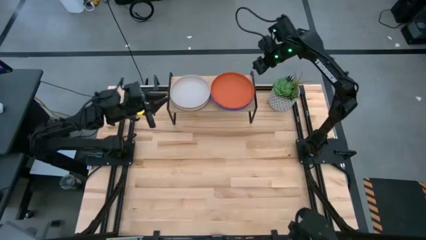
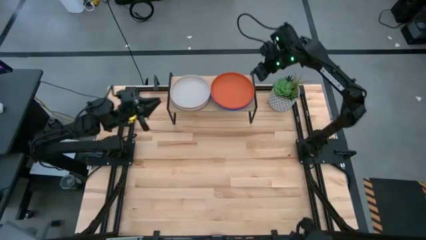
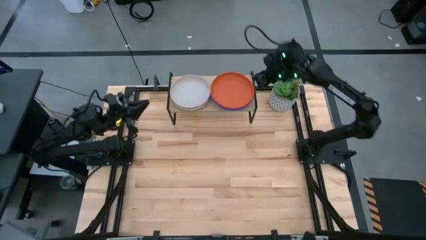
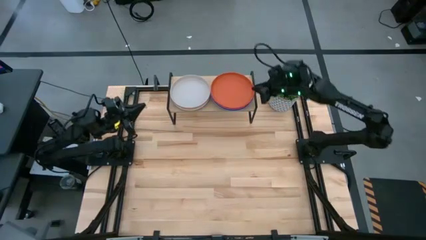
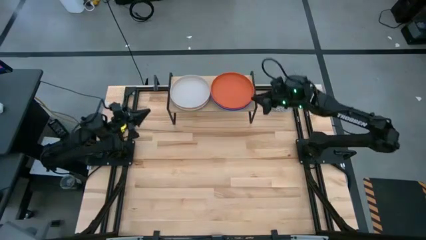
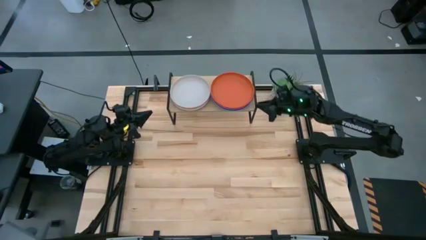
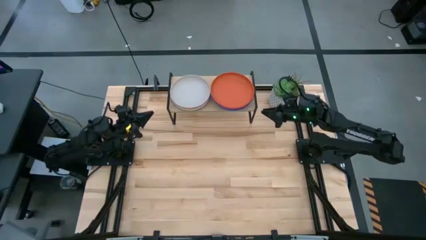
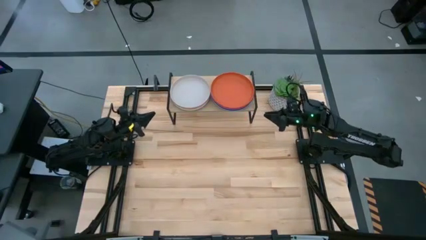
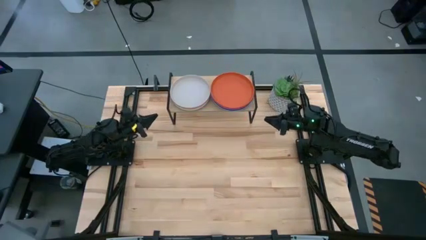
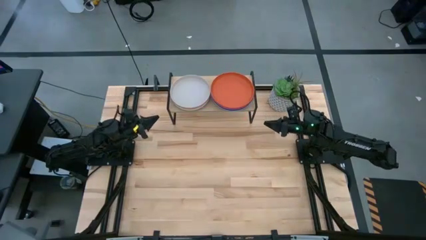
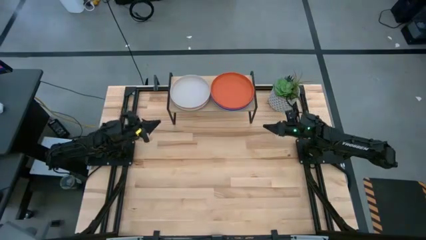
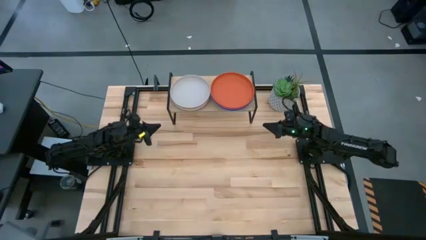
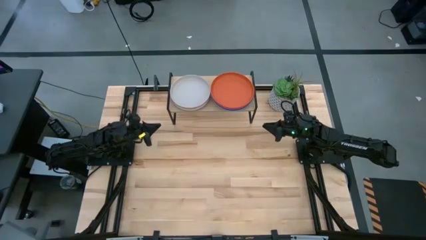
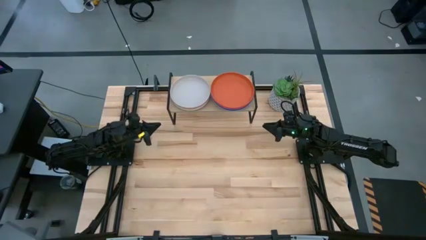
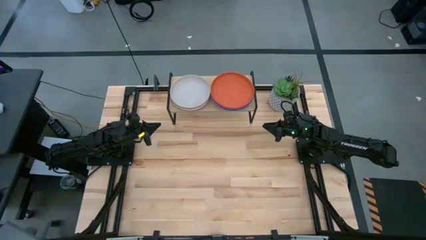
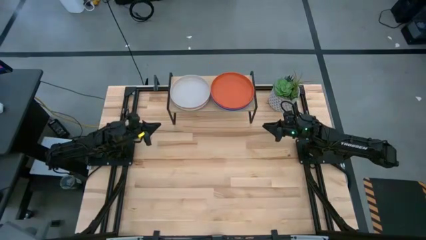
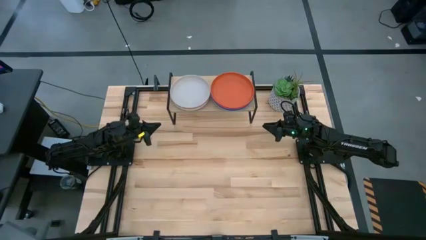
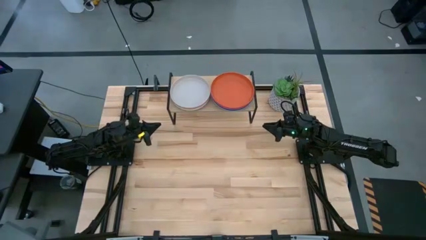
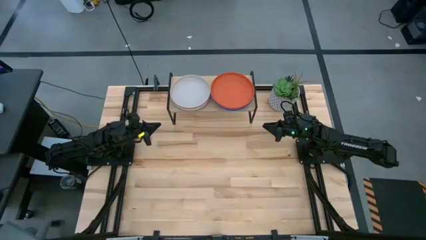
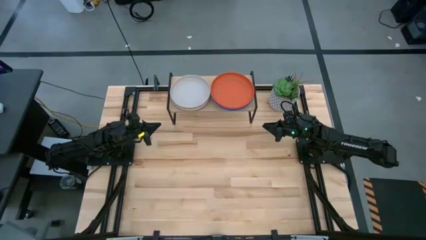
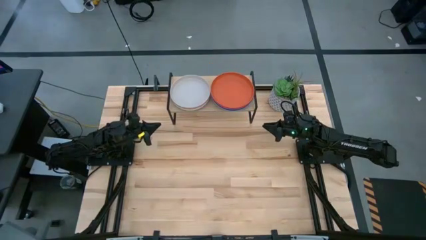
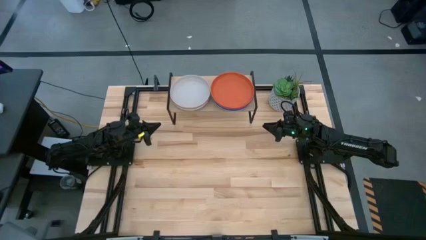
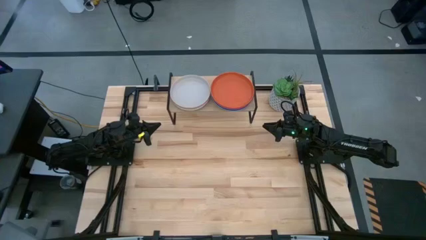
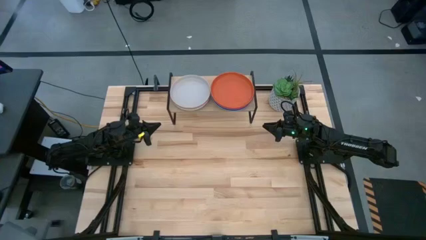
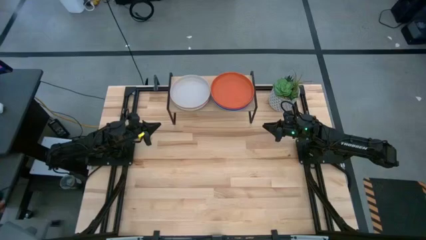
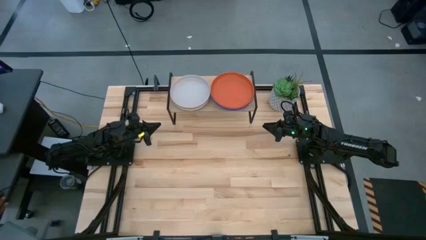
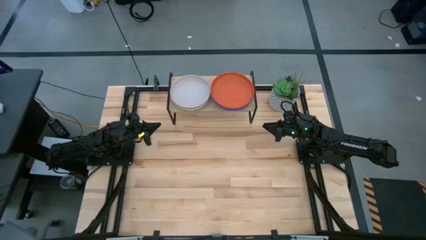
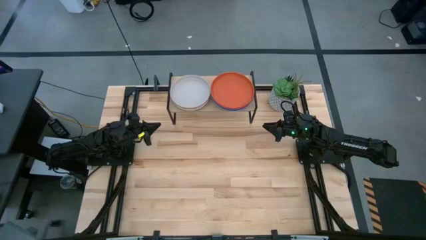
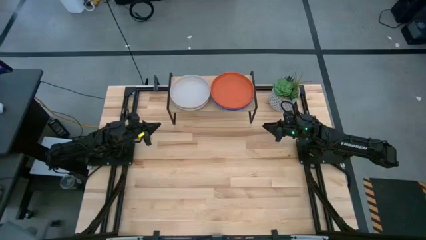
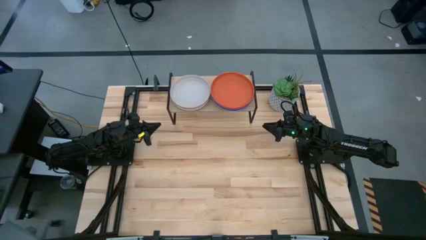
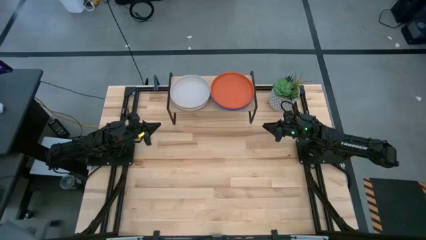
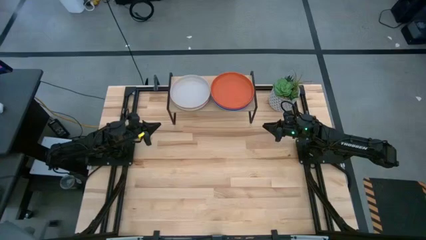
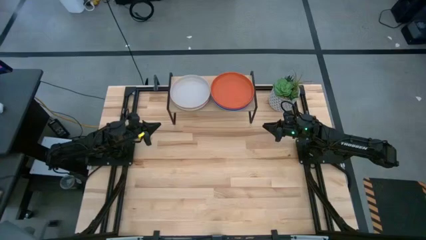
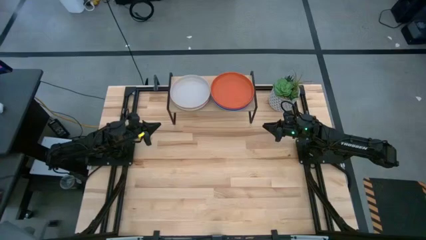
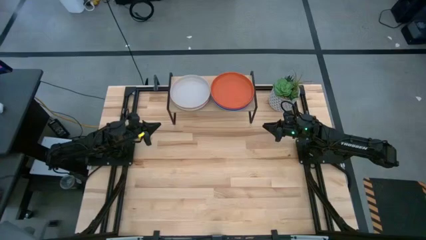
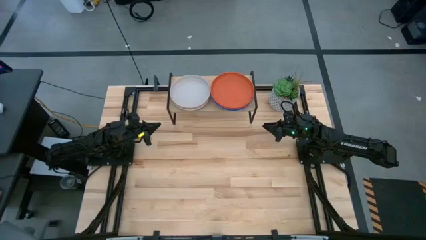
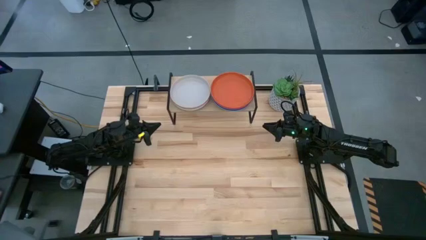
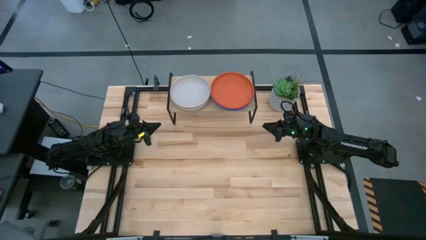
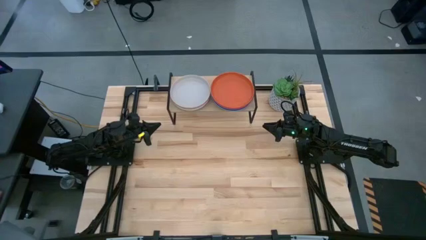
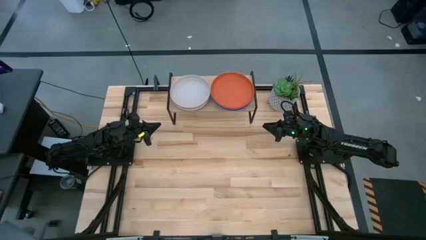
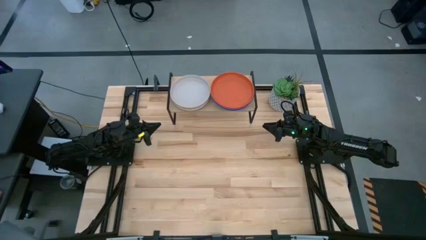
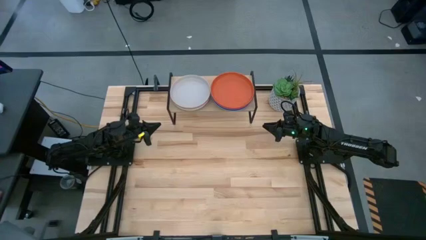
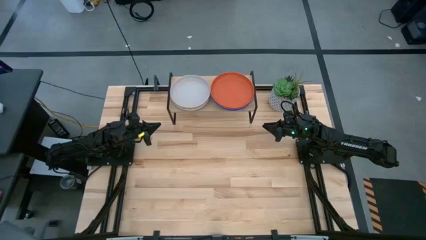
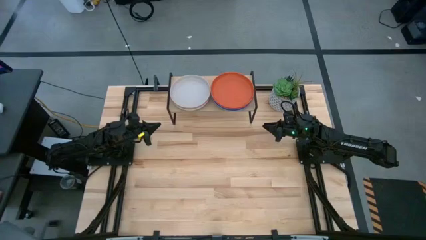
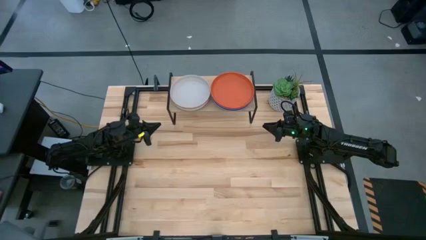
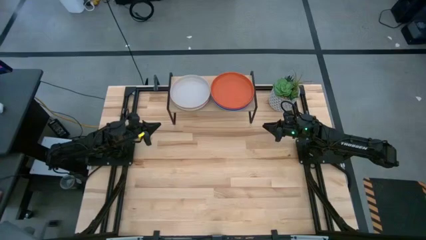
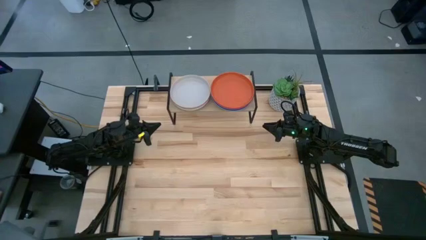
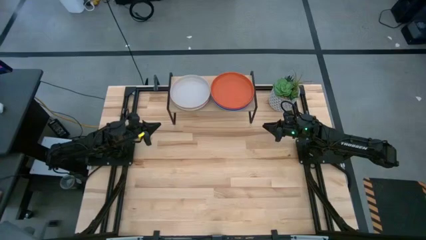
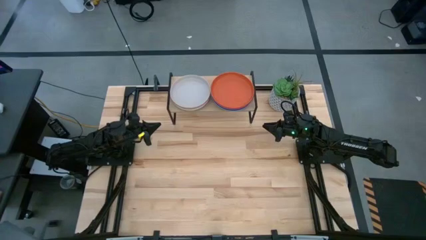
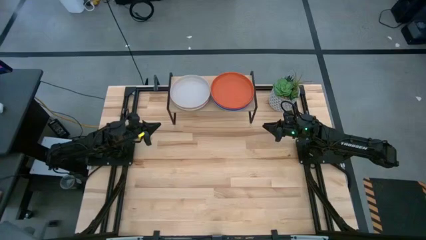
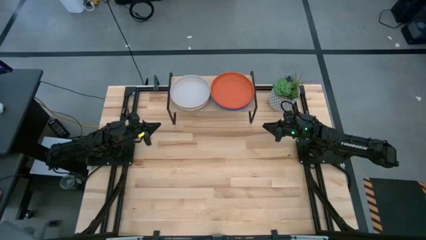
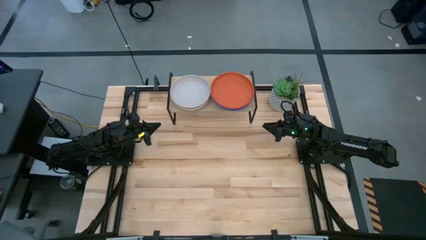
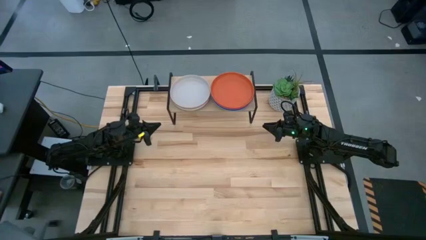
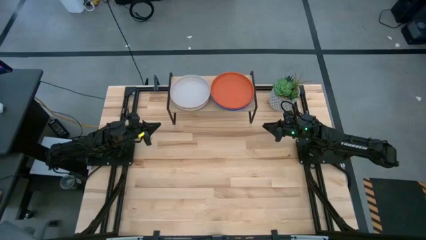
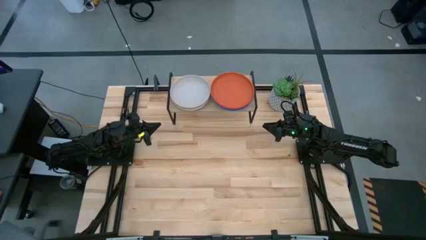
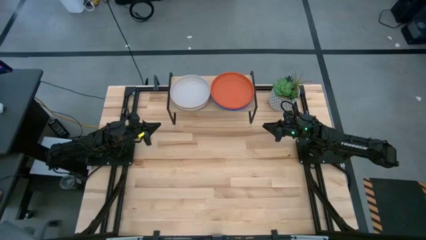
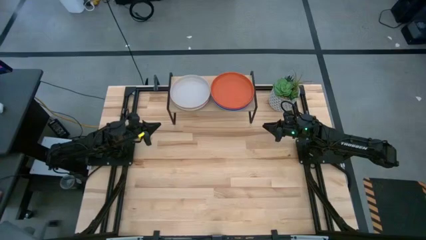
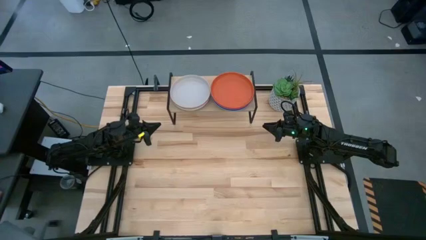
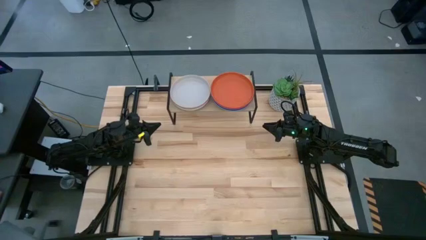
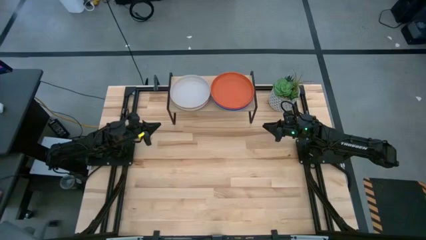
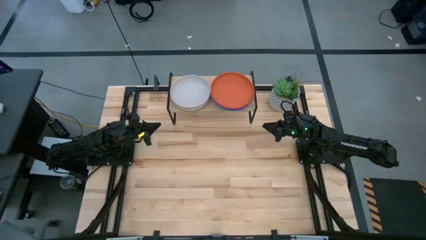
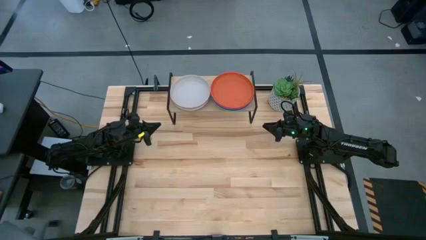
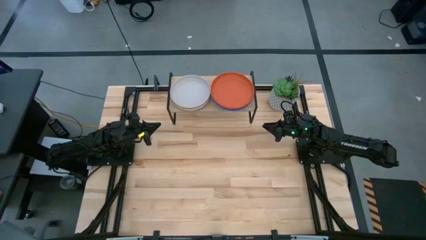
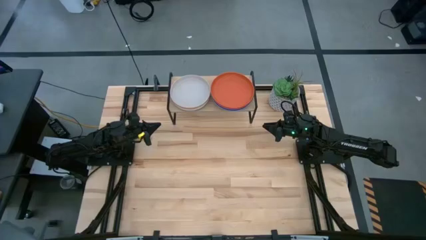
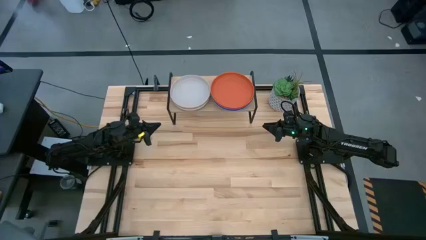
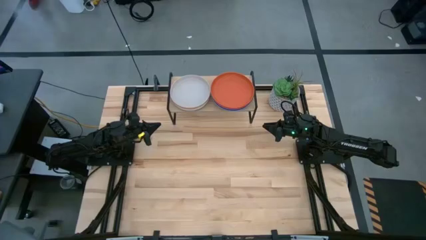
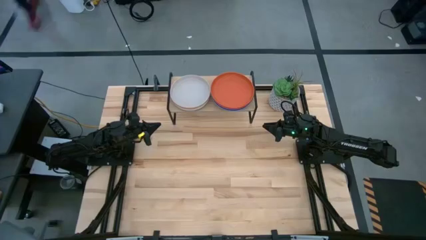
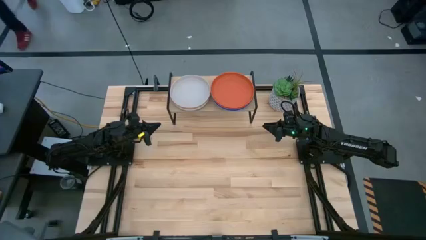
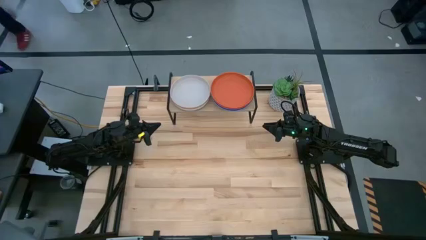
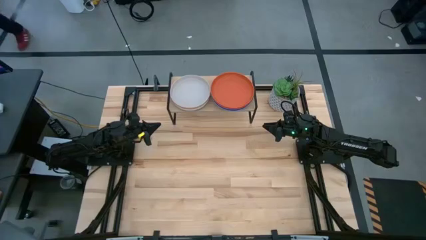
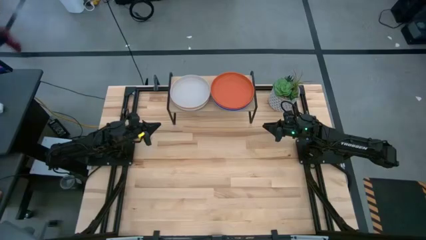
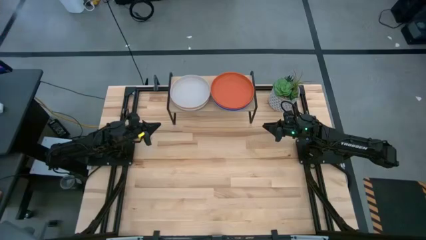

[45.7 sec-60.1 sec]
Task: Place and stack plates onto a shelf
Return to Home Position

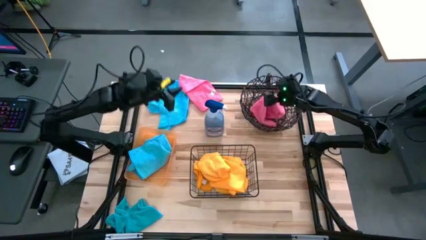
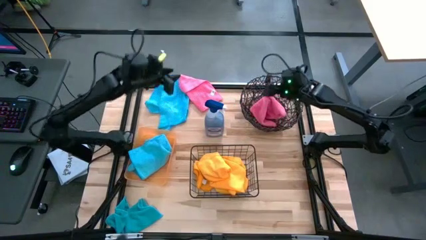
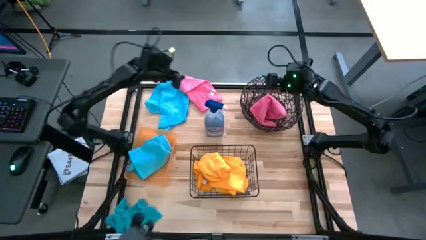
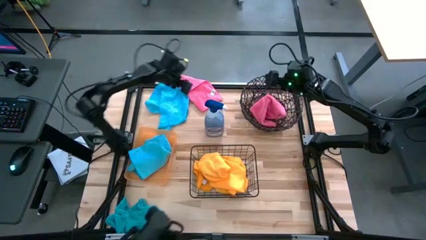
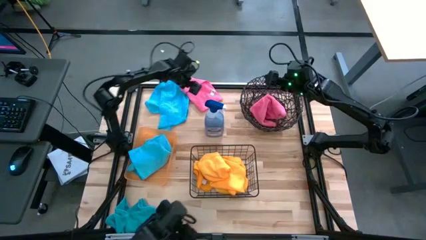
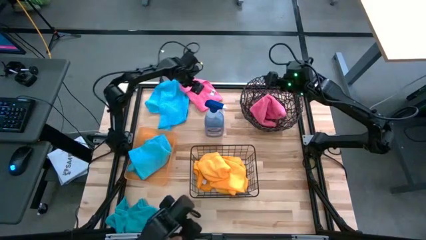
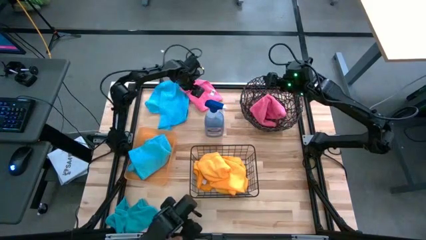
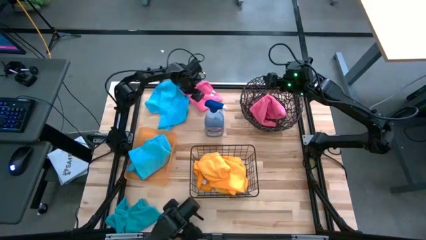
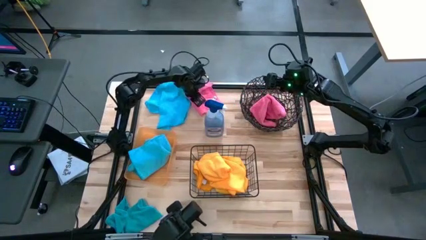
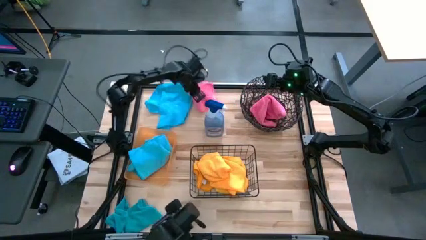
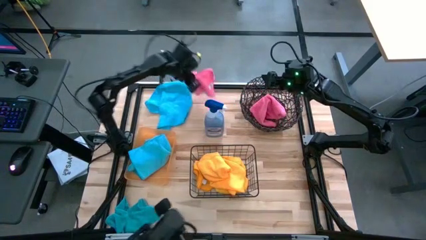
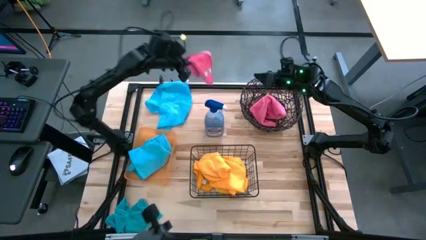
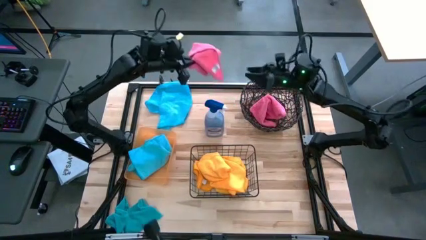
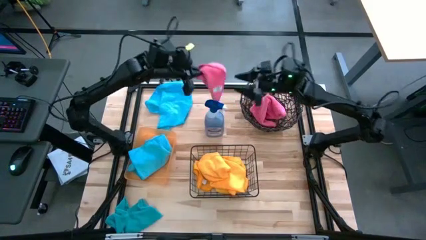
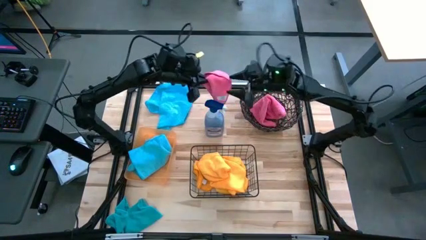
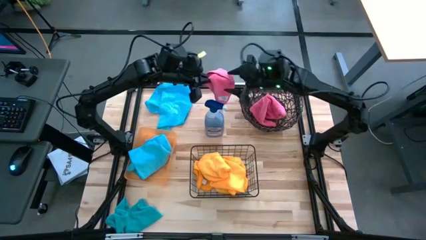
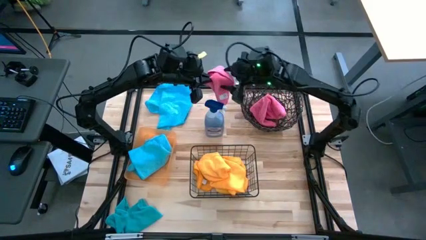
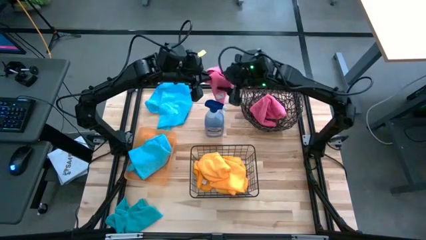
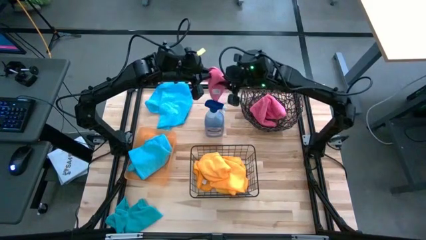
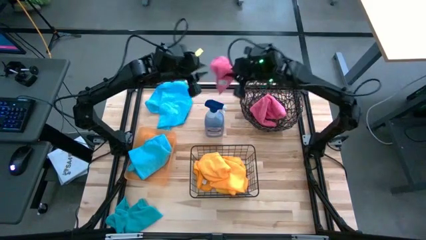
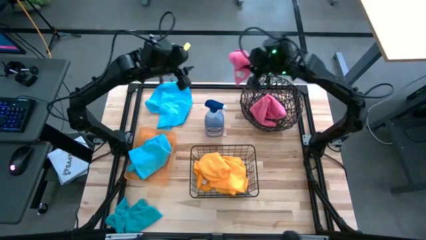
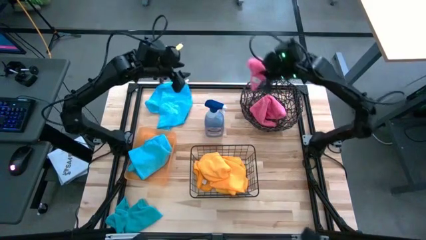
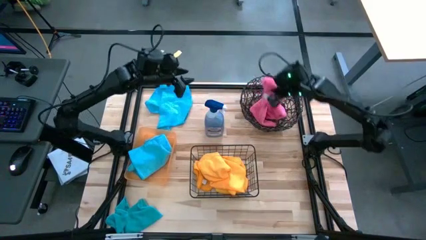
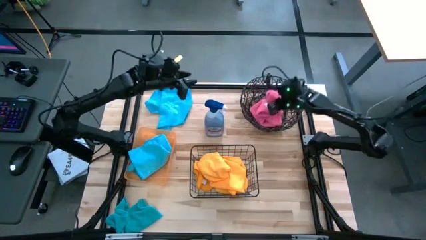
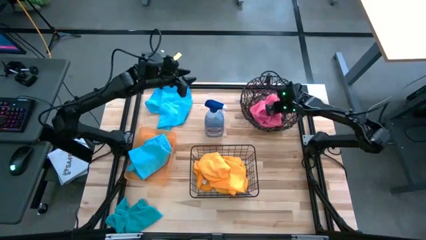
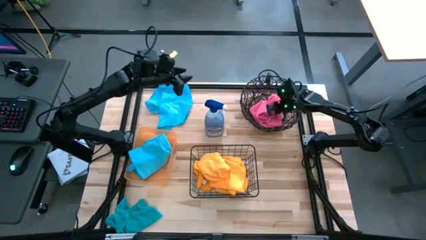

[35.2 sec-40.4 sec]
Task: Sort microfiber towel by color & place in baskets
Put the pink microfiber towel into the basket
